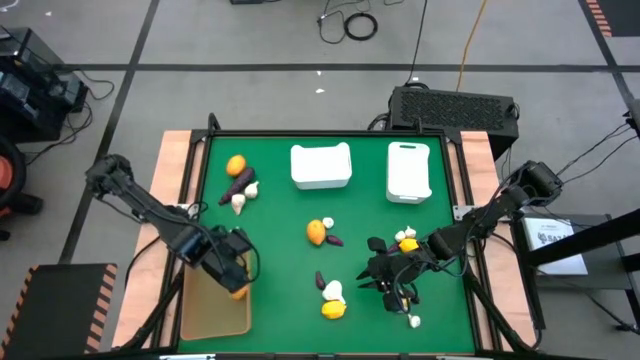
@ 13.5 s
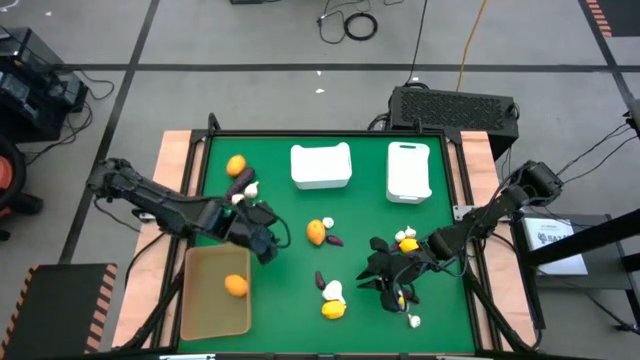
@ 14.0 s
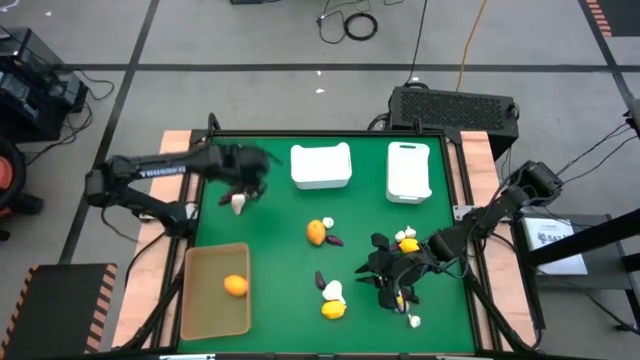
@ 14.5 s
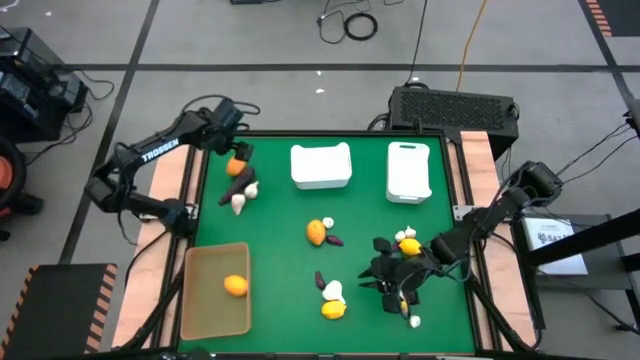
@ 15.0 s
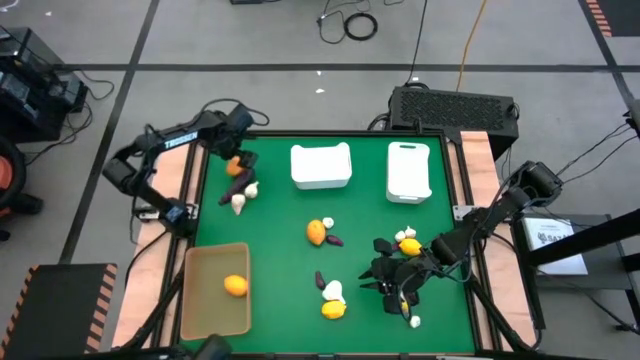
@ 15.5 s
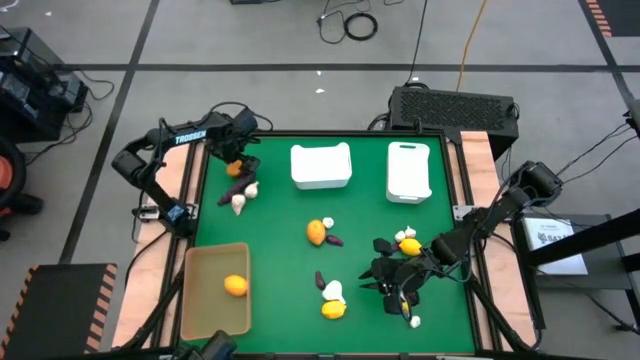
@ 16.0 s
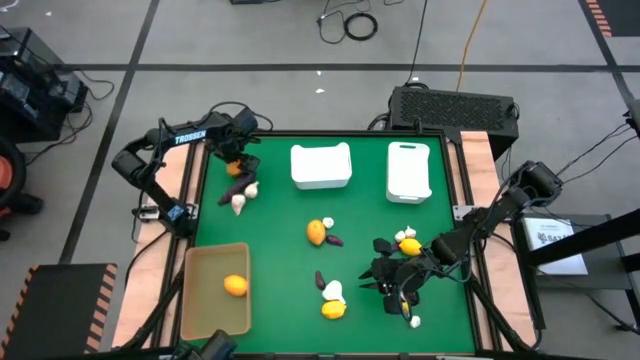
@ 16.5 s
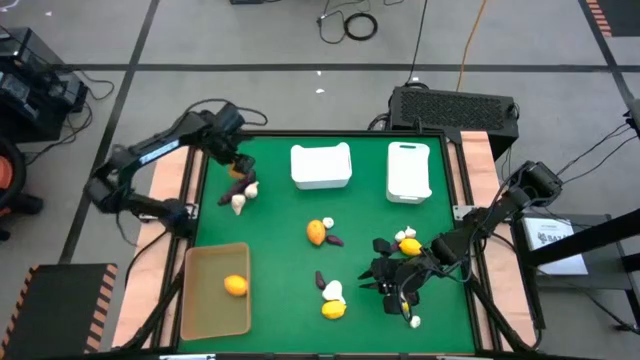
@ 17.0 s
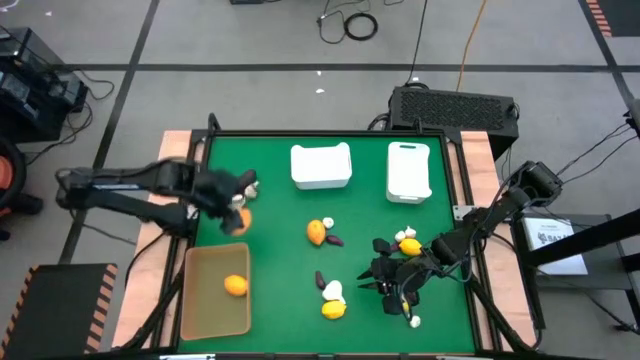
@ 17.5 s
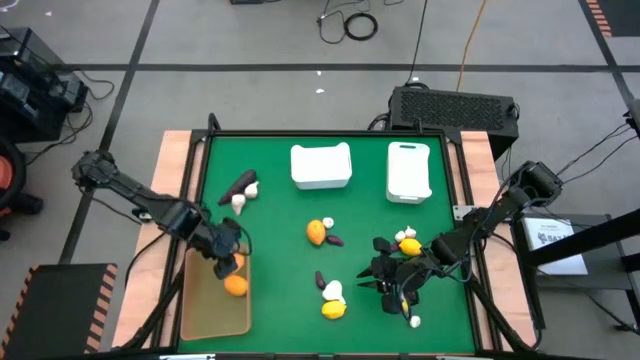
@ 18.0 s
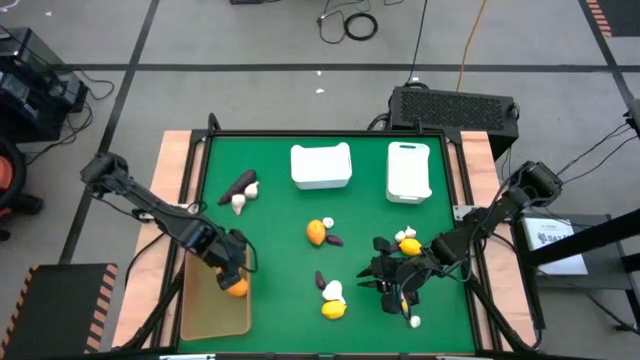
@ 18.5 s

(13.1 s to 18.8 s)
Task: Sort produce into baskets
Put the yellow lemon into the yellow bin

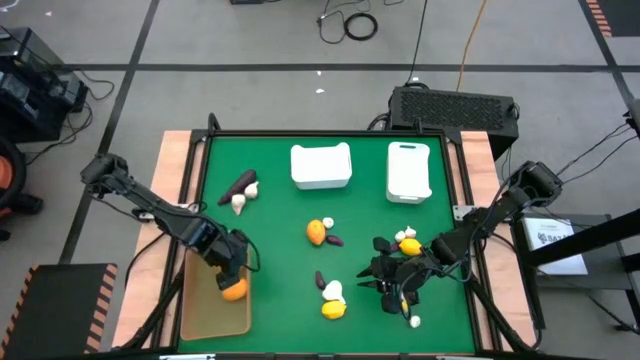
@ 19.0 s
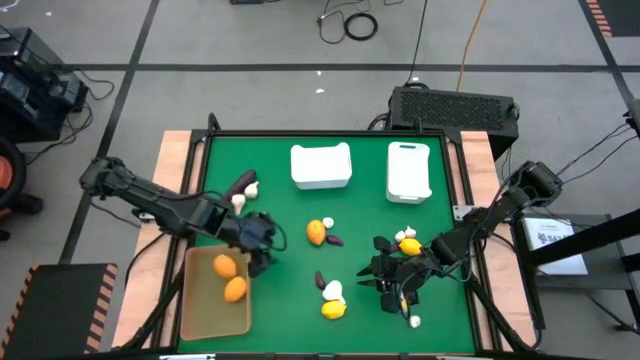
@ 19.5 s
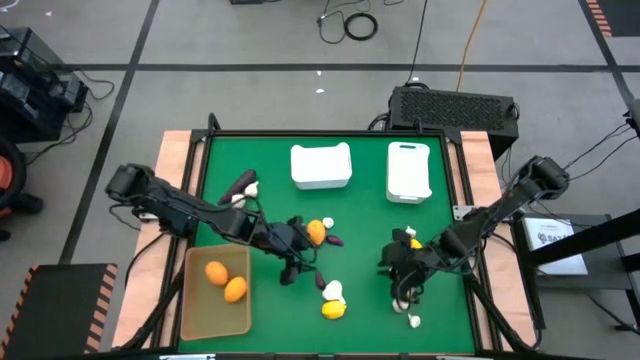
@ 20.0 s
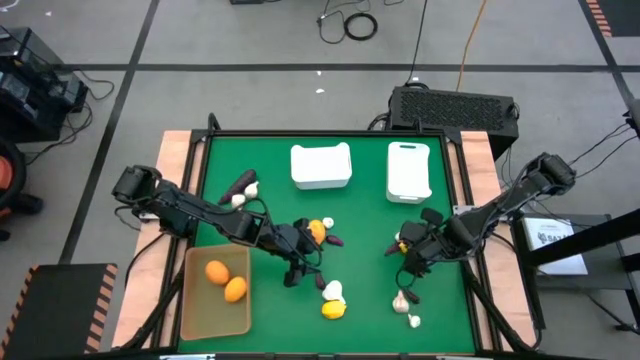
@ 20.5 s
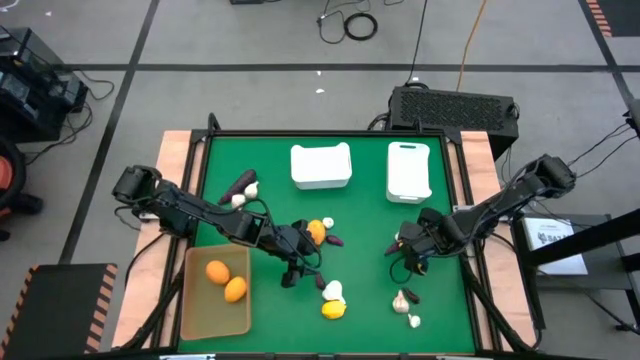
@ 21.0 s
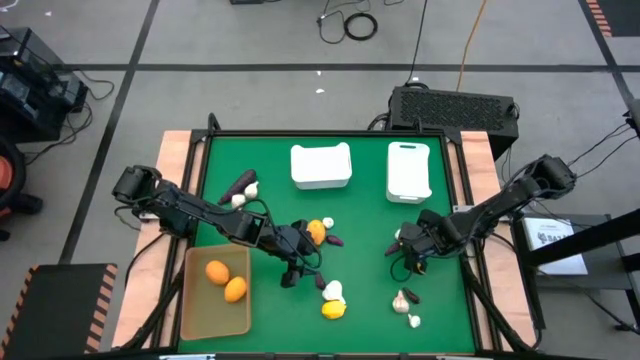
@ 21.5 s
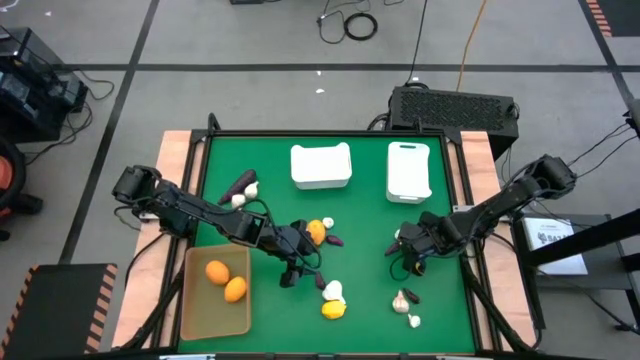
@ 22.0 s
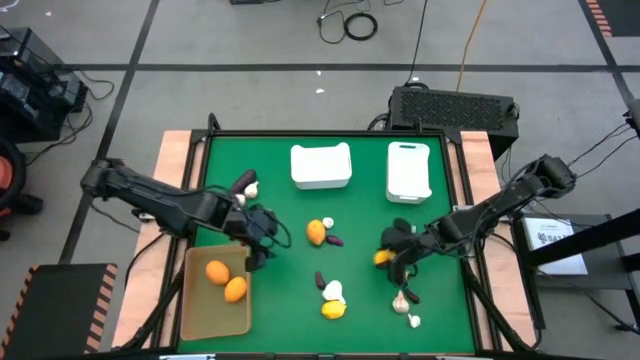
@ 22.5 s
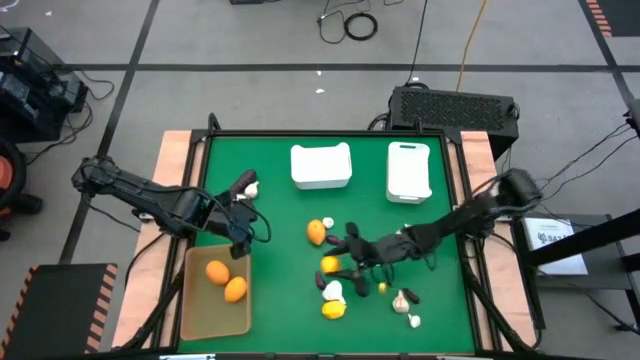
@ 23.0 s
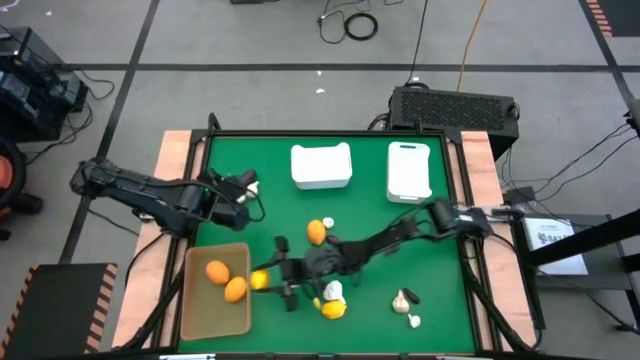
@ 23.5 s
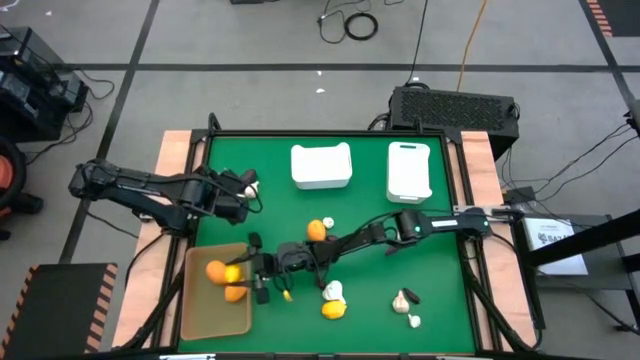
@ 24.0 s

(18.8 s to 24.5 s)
Put the yellow lemon into the yellow bin

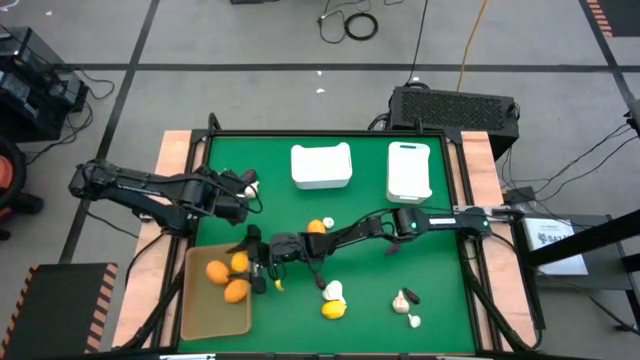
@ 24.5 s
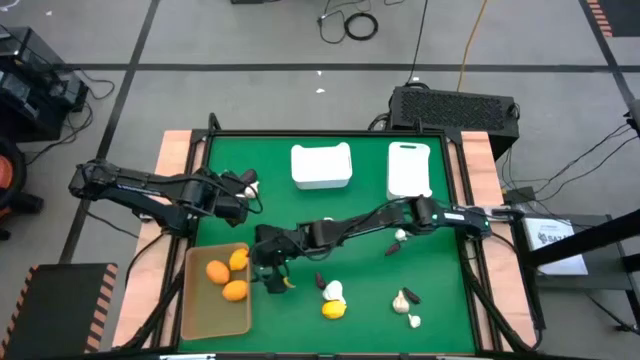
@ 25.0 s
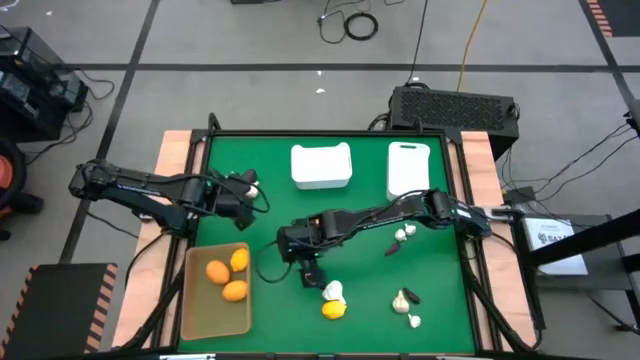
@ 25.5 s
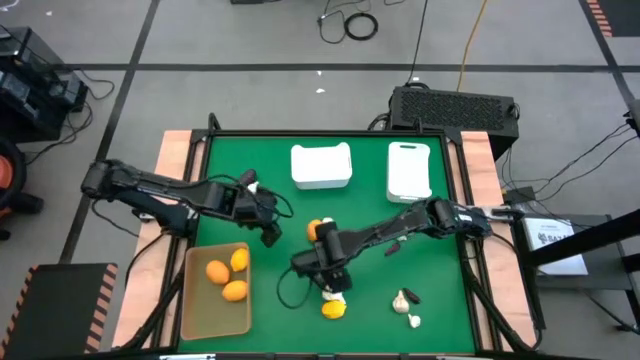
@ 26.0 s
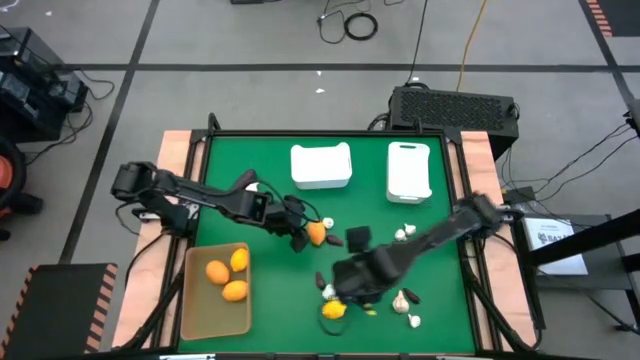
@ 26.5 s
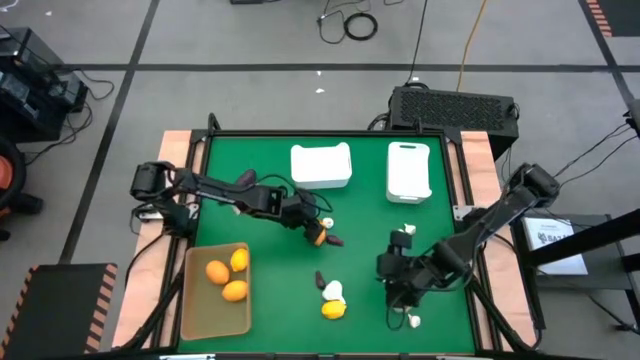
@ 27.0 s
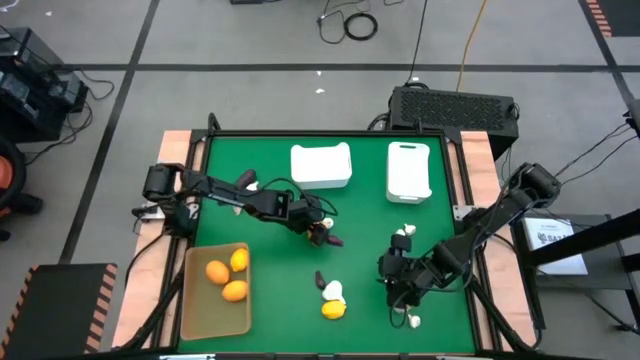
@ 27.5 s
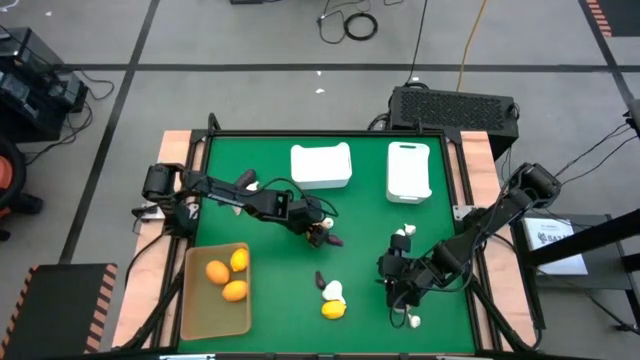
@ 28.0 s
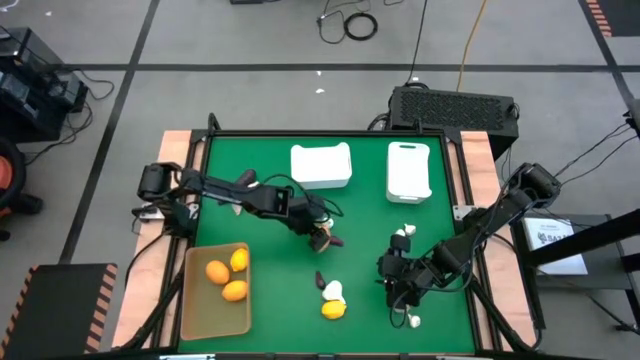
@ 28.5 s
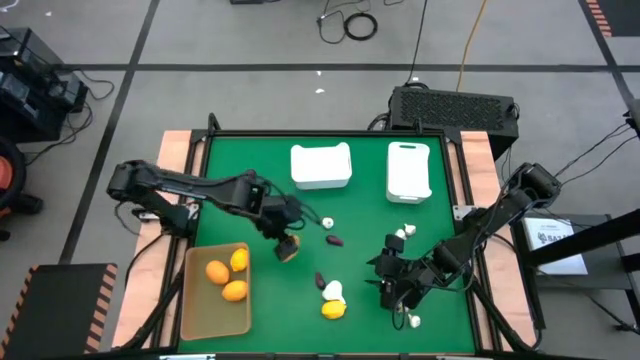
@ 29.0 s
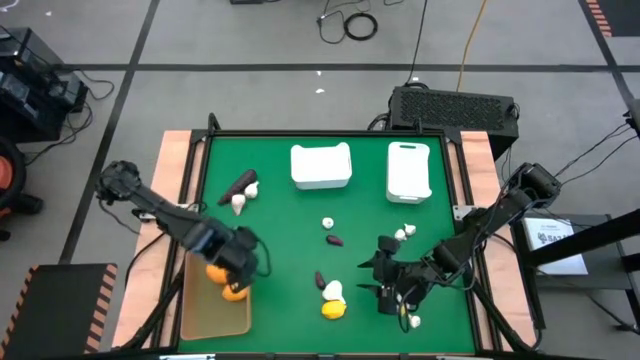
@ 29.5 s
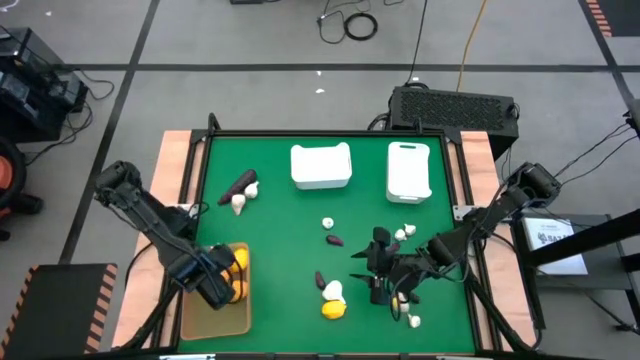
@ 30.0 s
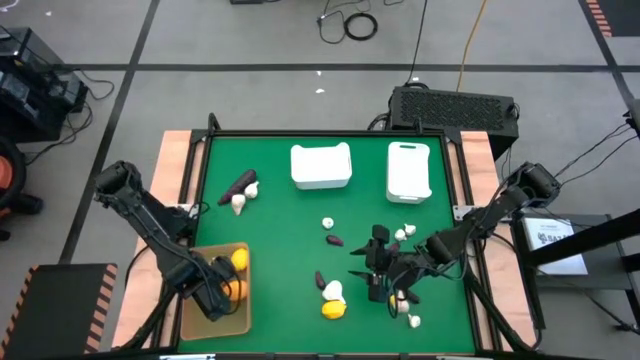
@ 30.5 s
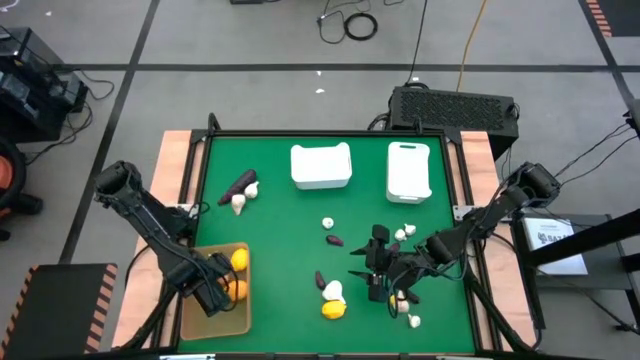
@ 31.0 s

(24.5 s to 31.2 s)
Put the yellow lemon into the yellow bin

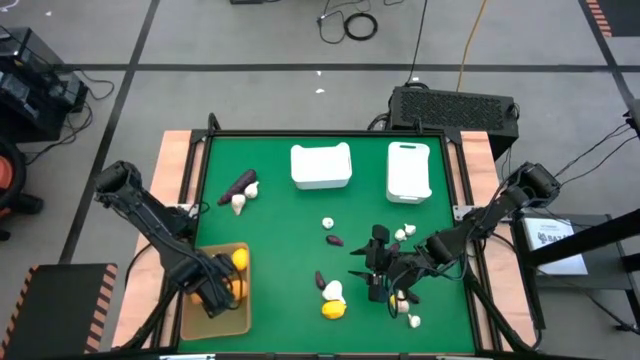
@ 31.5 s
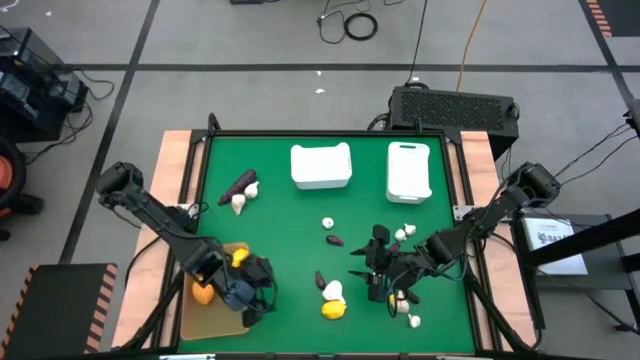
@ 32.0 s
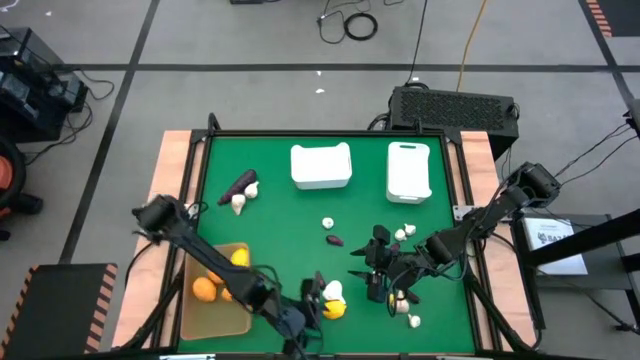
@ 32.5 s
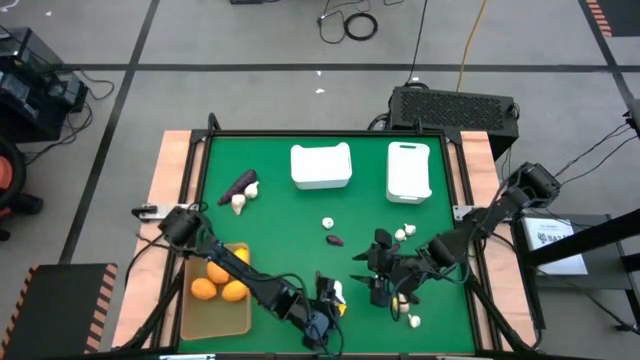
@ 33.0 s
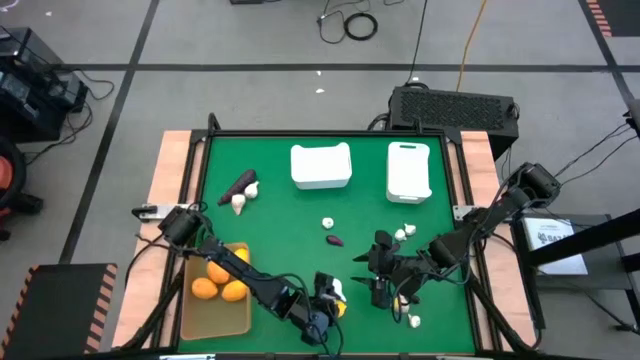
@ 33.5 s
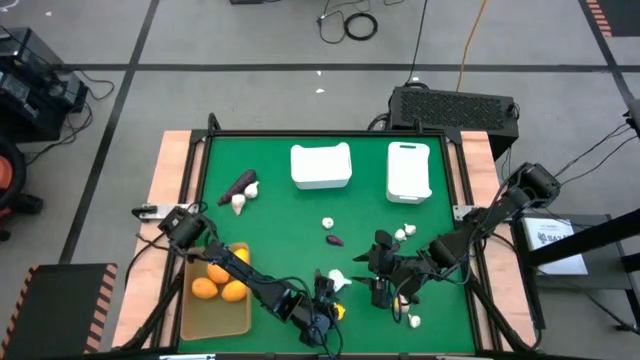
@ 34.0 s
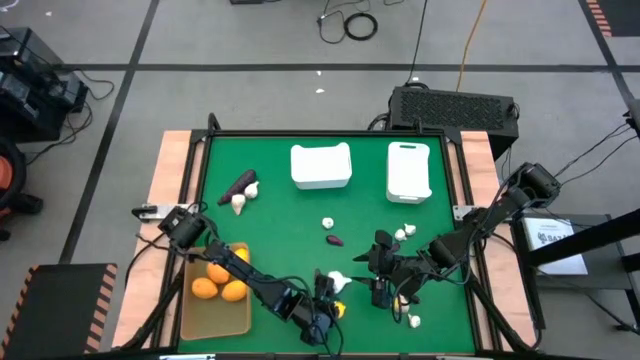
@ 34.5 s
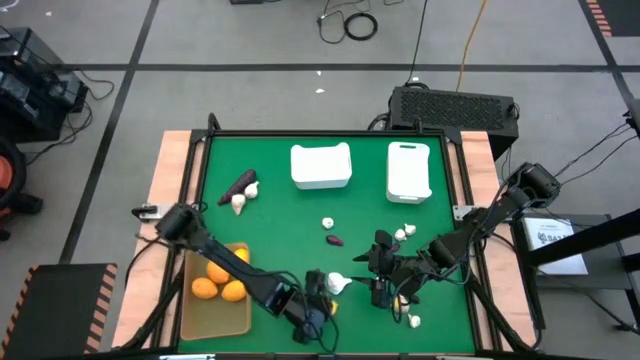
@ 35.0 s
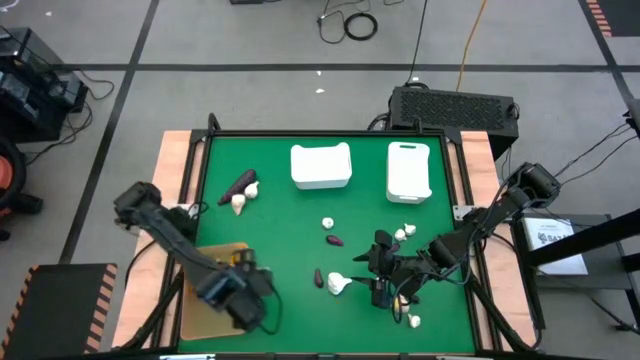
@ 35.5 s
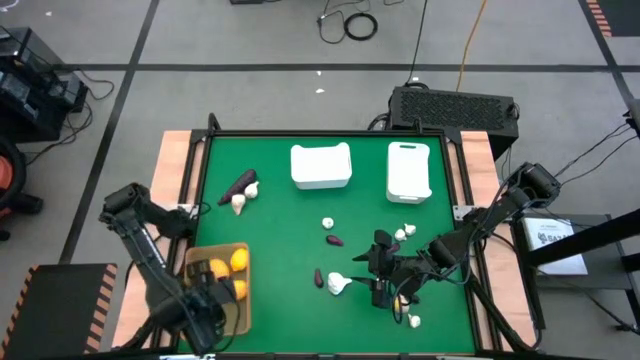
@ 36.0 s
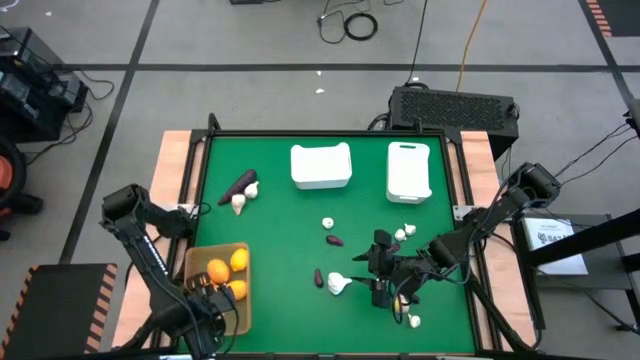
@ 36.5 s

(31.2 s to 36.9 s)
Put the yellow lemon into the yellow bin
